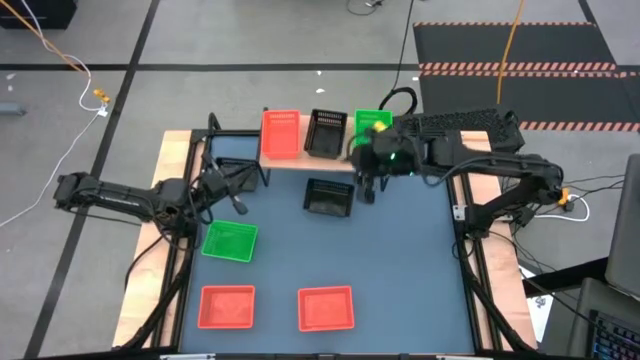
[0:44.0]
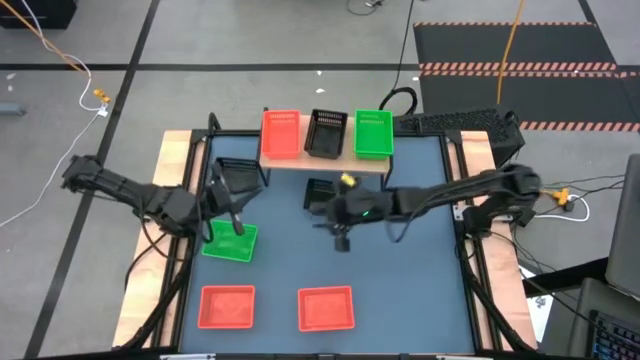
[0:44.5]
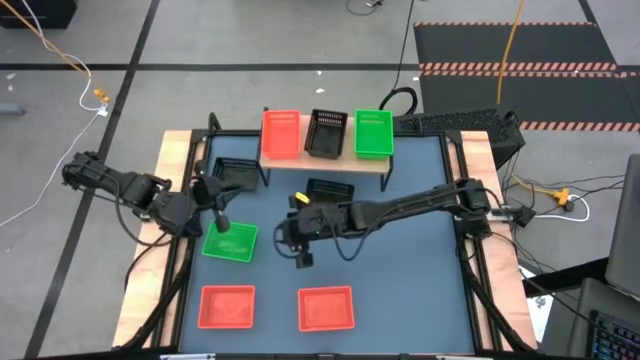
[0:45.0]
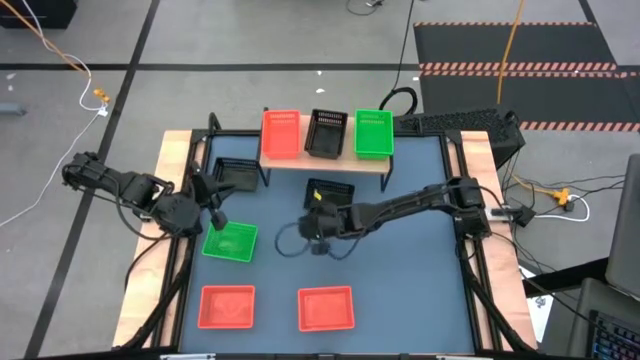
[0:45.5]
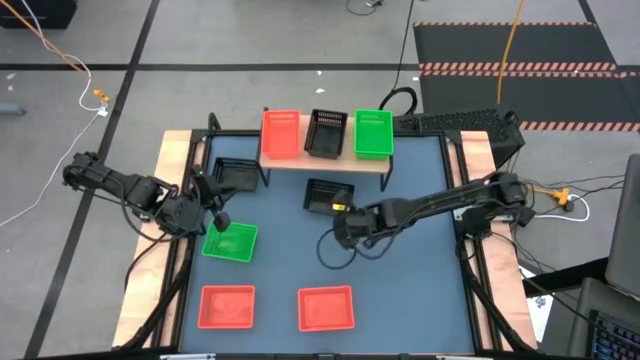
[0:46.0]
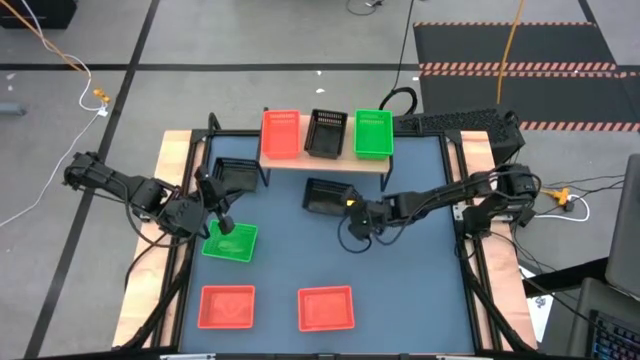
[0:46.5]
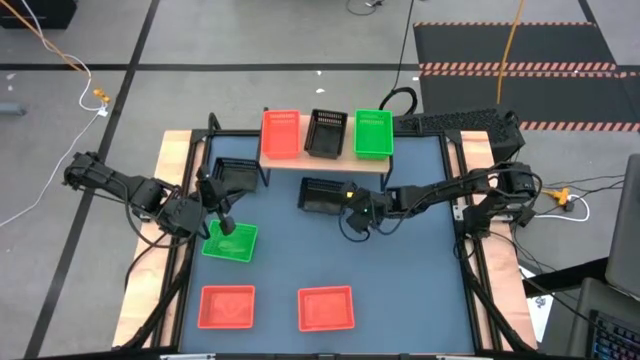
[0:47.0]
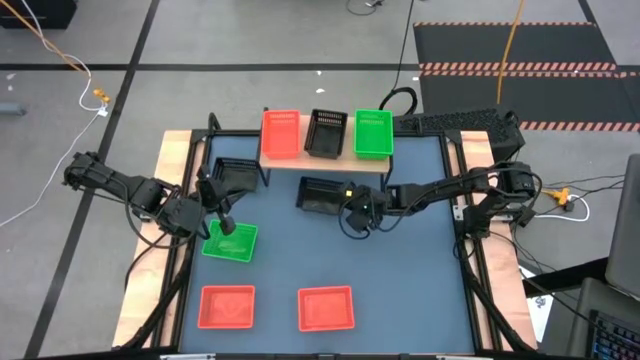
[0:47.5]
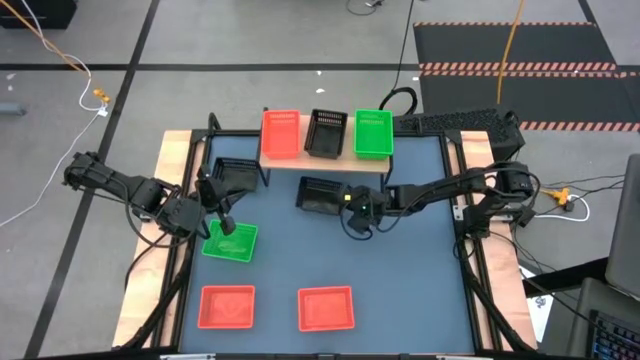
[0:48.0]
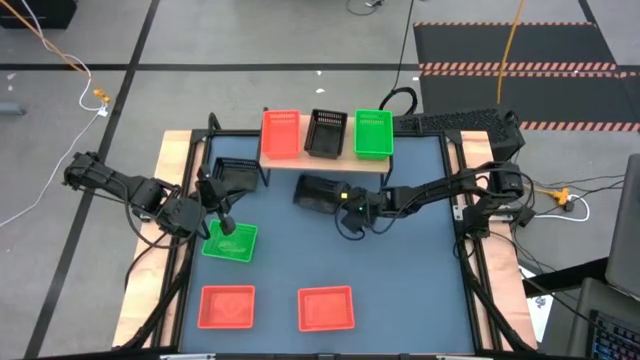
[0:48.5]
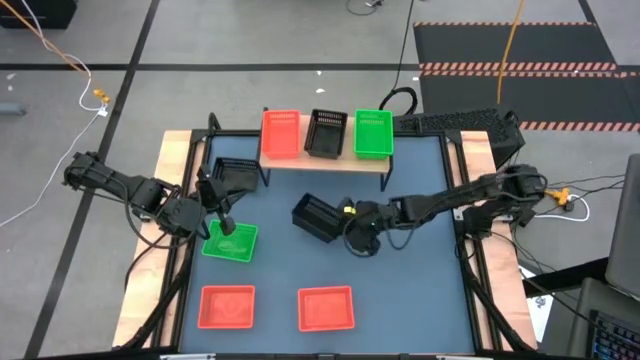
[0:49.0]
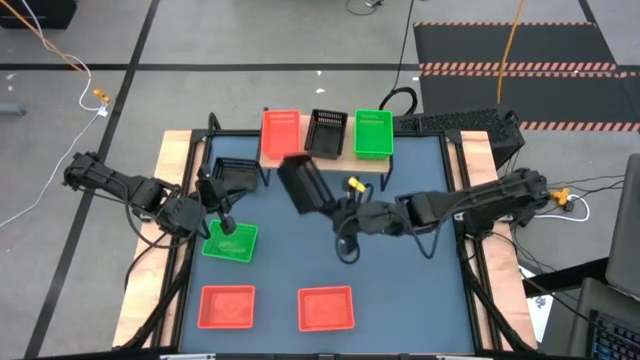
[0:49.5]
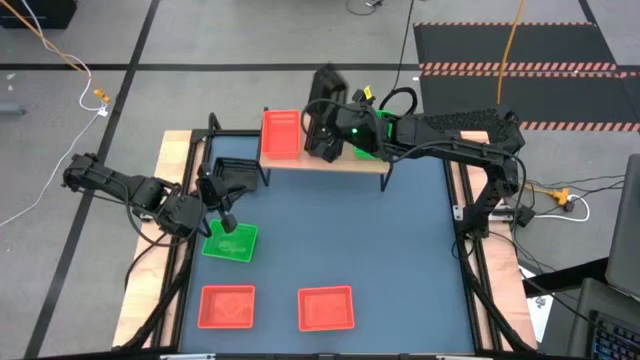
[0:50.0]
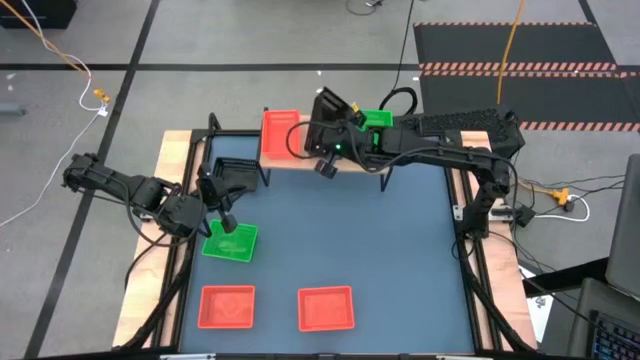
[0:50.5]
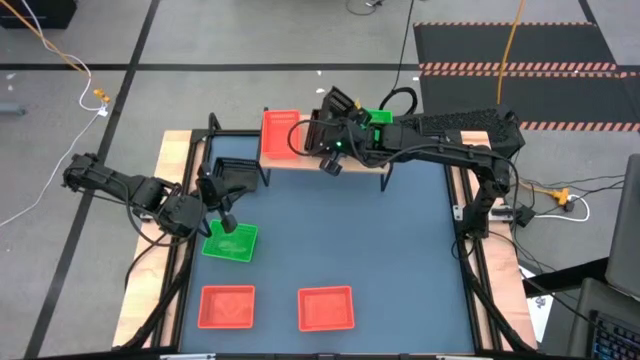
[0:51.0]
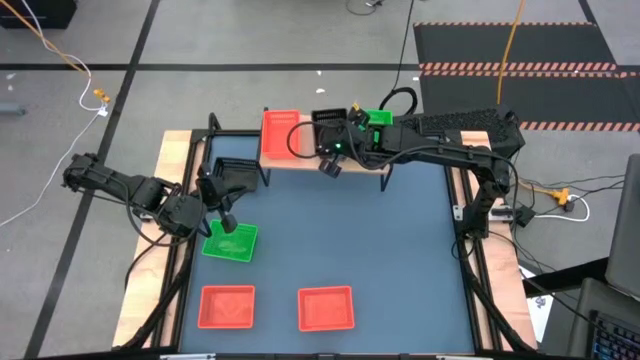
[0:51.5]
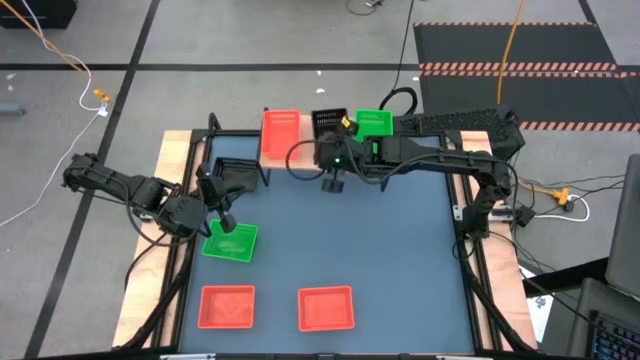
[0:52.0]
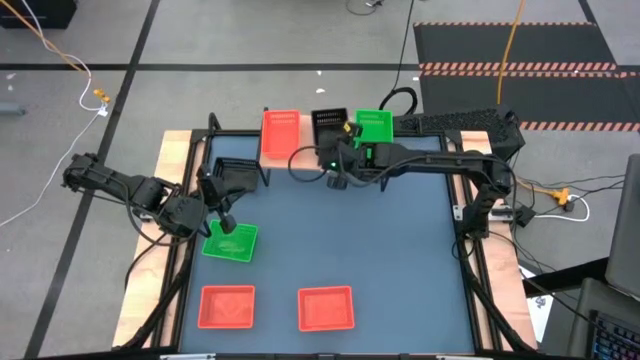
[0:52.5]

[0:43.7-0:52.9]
Task: Stack baskets on shelf by color
Stack the right black bin on top of the black bin on the shelf

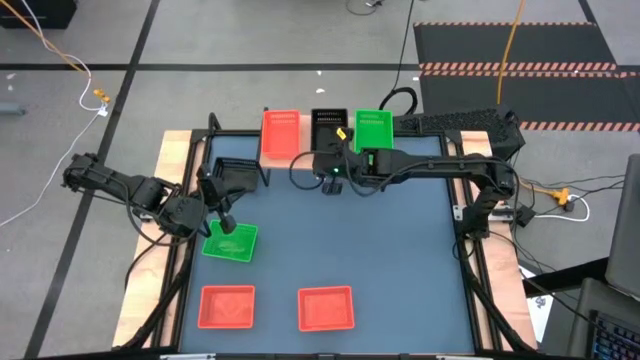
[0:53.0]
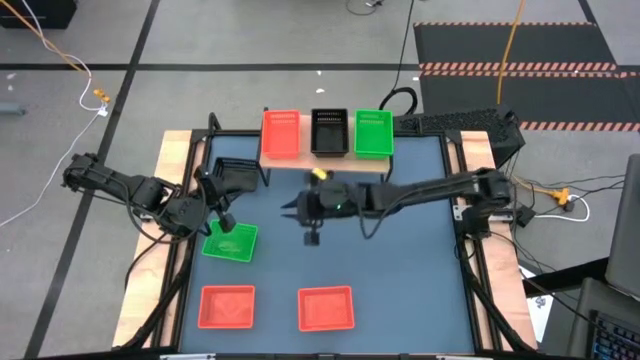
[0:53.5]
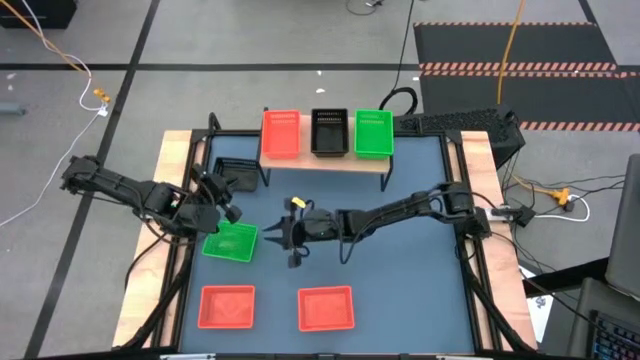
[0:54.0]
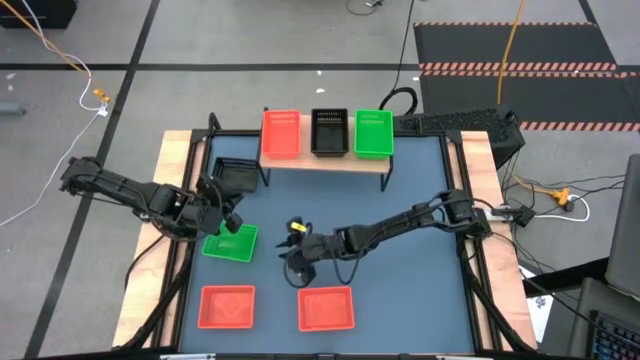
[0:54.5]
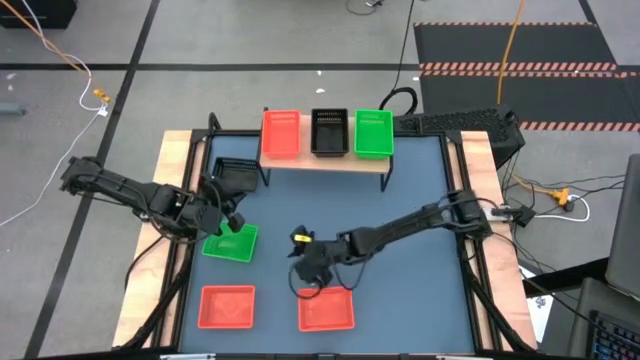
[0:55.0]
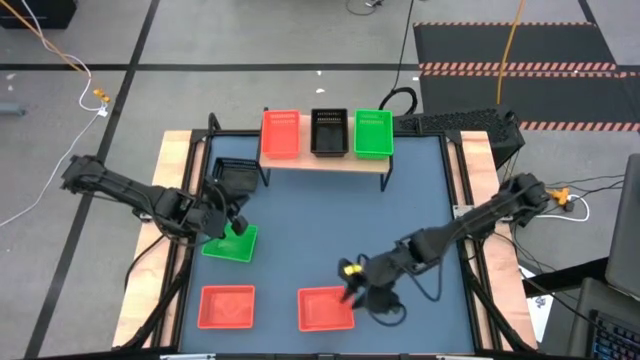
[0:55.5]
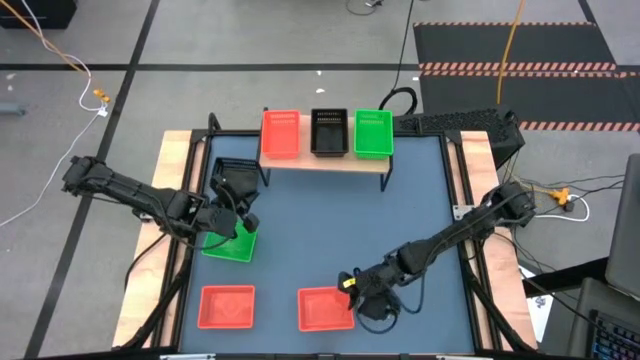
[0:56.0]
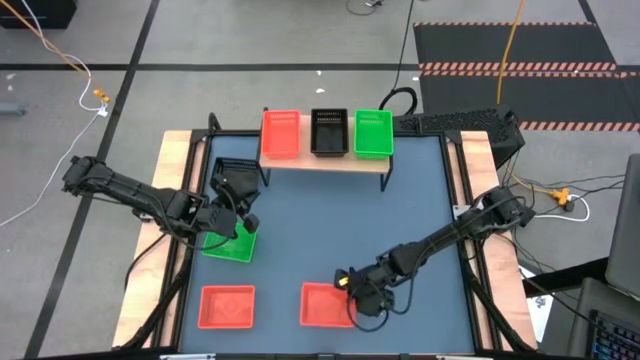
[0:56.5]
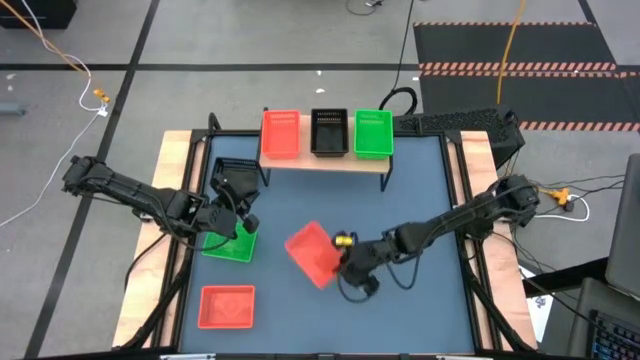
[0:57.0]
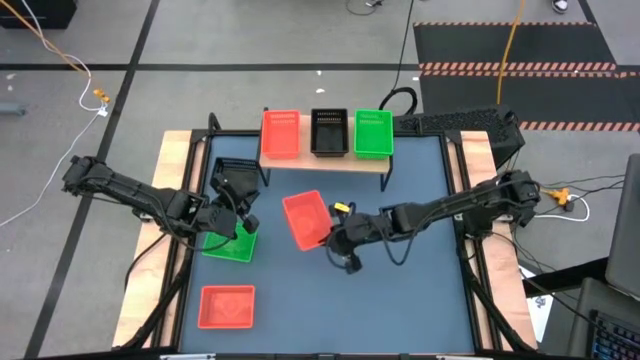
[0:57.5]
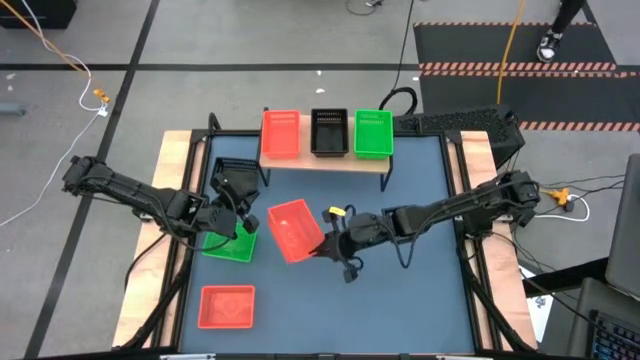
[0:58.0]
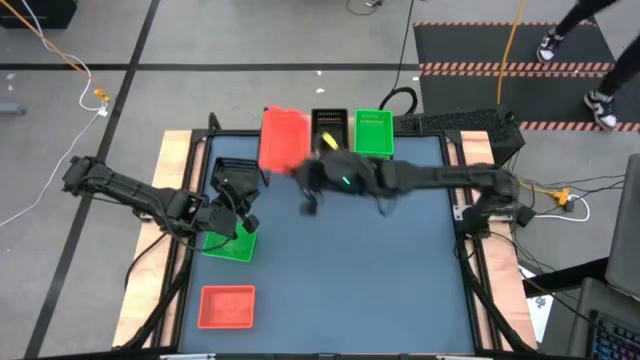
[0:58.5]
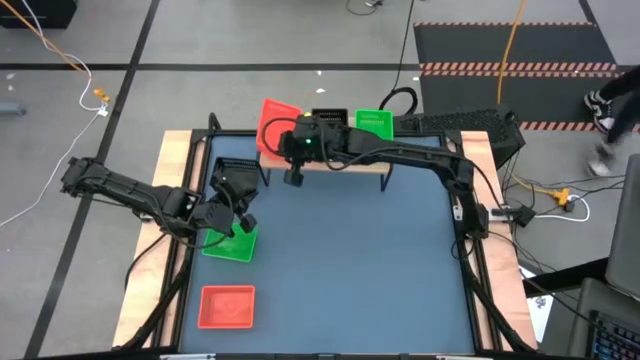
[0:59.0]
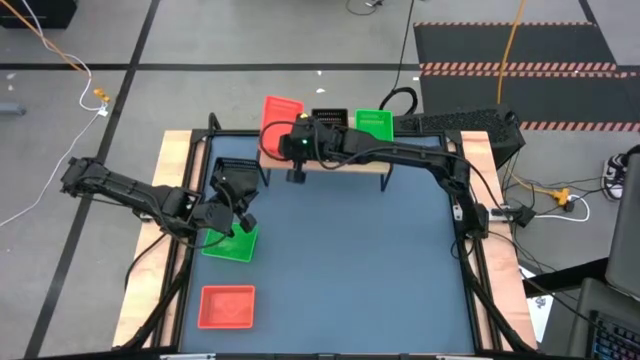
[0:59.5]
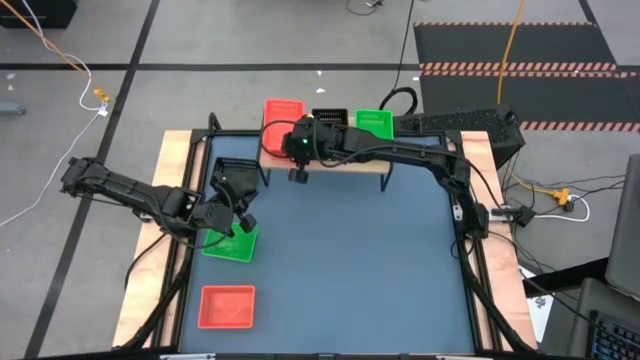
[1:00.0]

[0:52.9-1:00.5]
Stack the right orange bin on top of the orange bin on the shelf

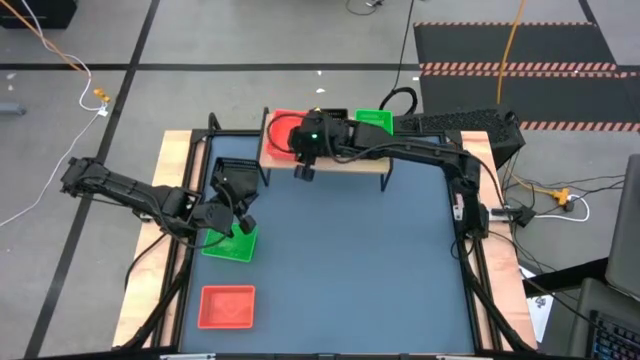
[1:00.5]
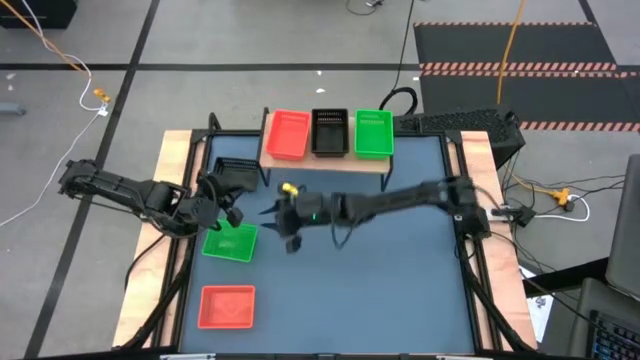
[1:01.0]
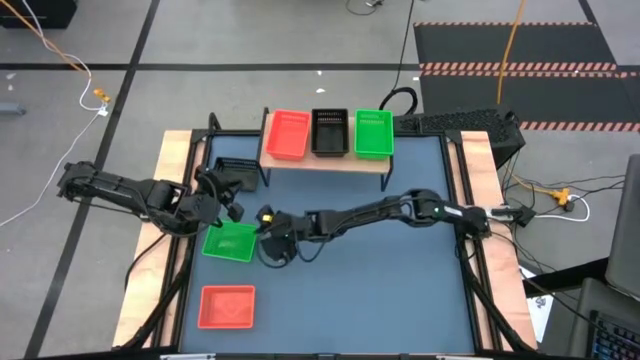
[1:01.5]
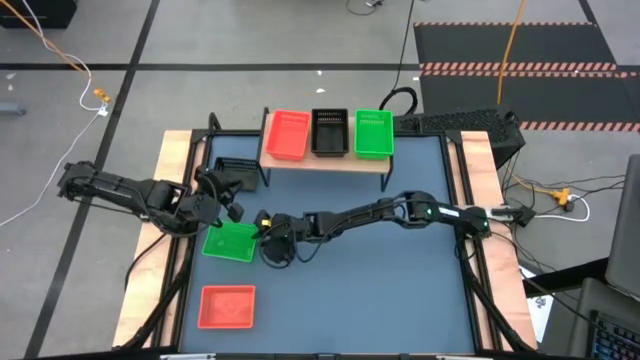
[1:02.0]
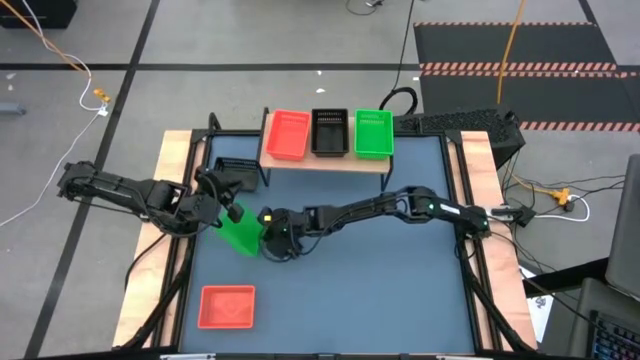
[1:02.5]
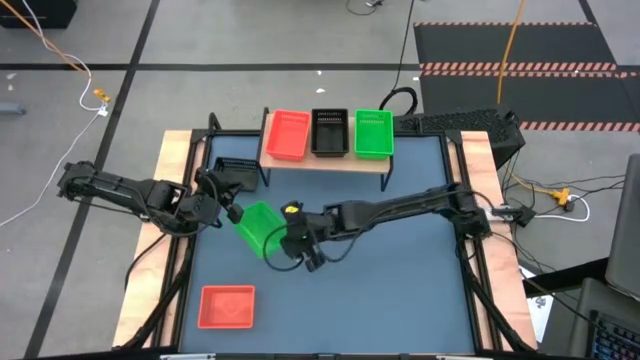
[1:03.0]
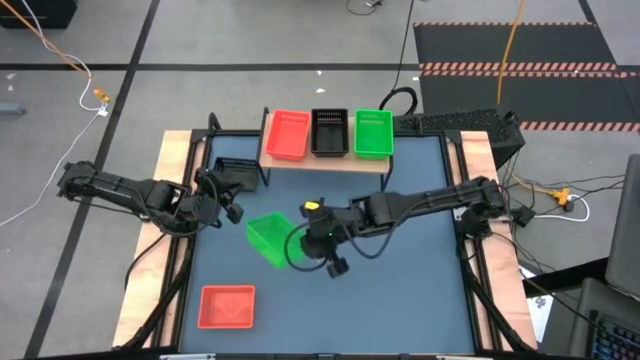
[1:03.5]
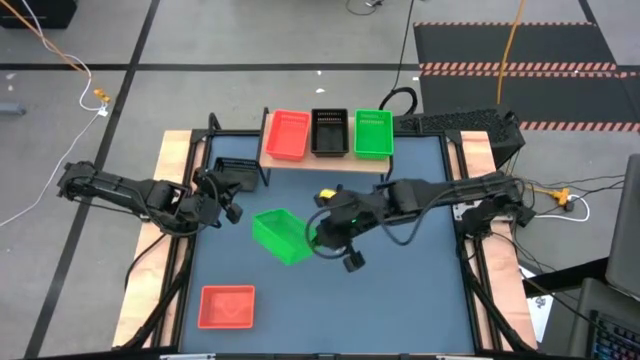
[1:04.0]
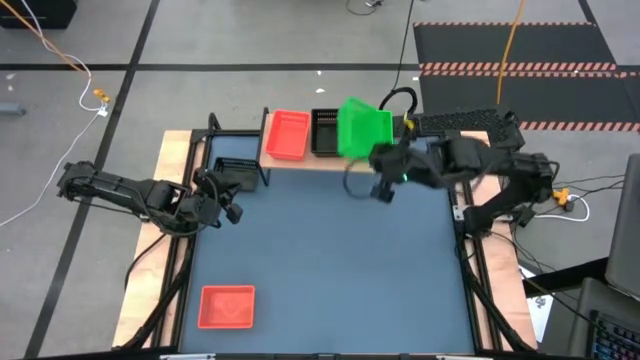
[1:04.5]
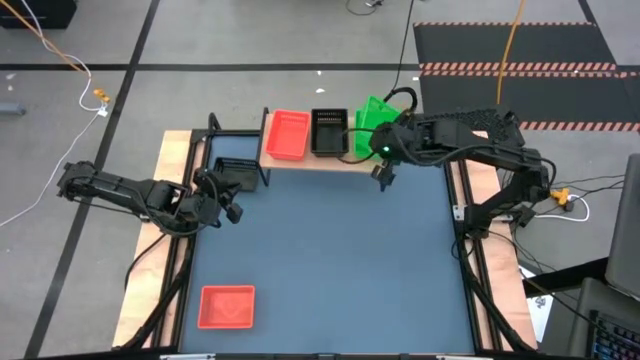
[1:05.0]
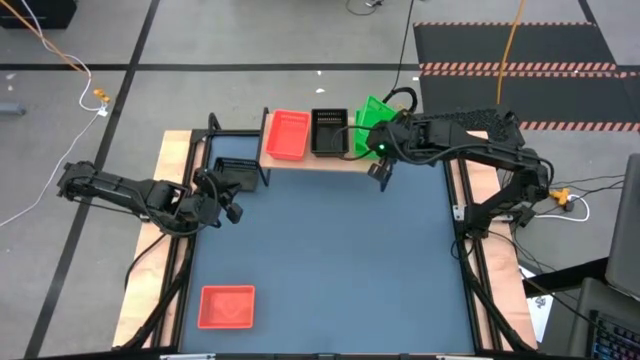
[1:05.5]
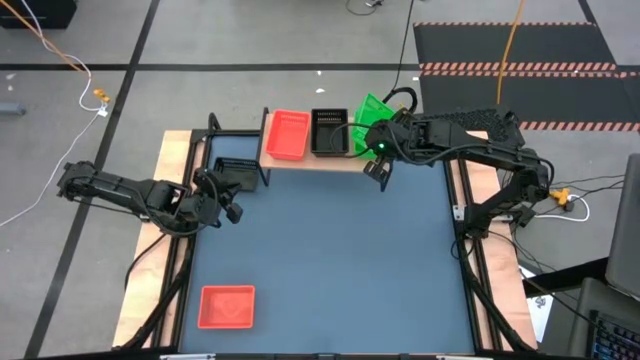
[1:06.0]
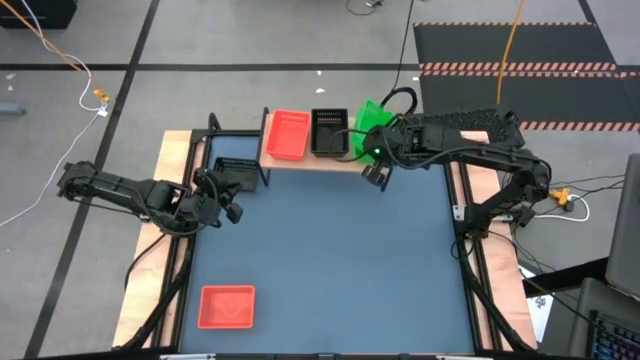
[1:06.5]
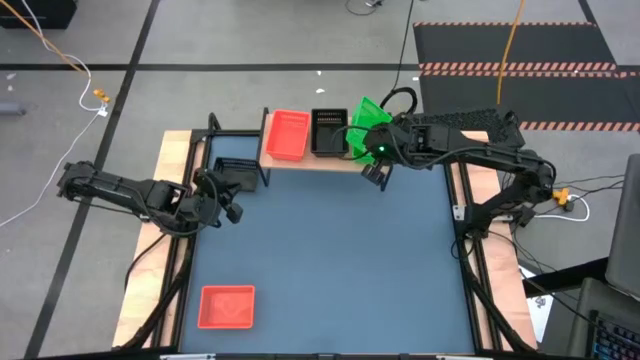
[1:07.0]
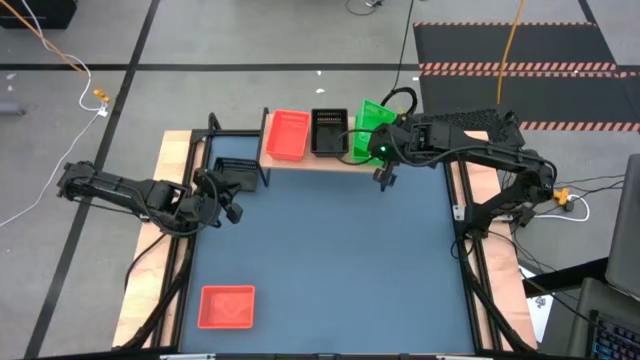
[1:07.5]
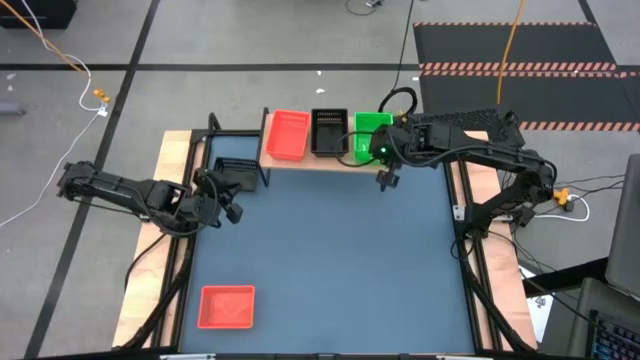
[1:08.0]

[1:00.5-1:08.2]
Stack the green bin on top of the green bin on the shelf
